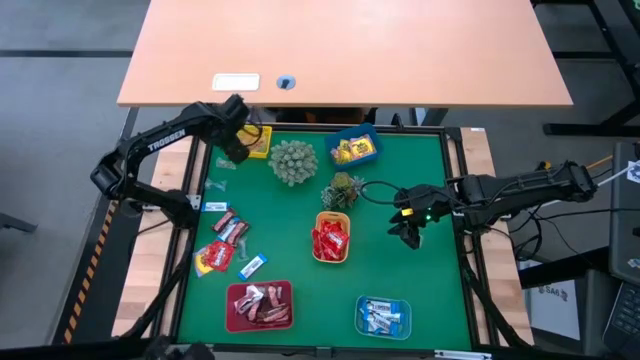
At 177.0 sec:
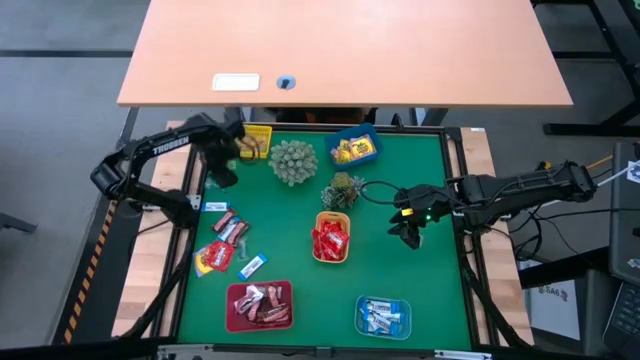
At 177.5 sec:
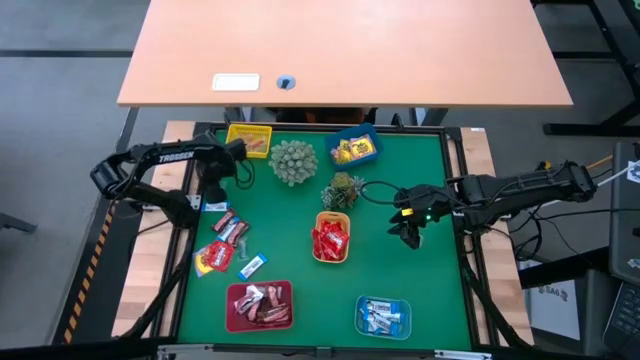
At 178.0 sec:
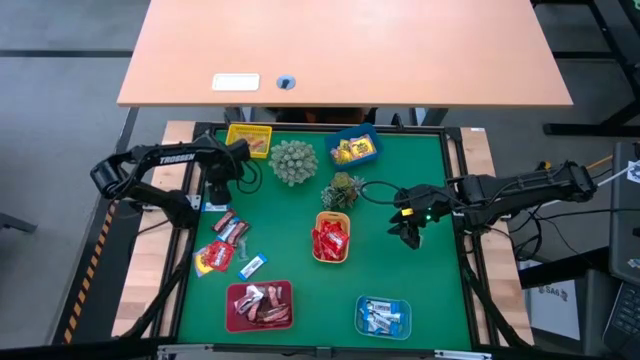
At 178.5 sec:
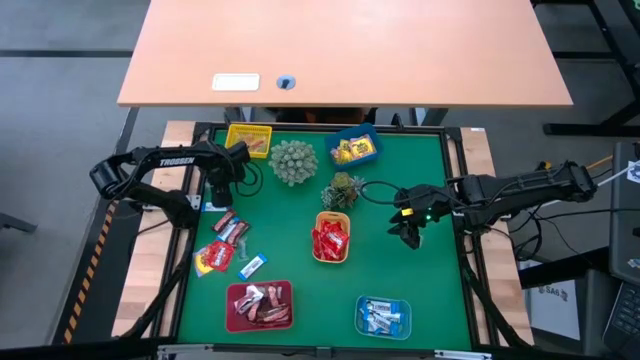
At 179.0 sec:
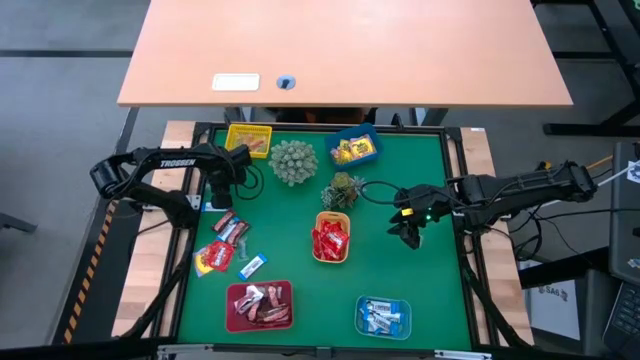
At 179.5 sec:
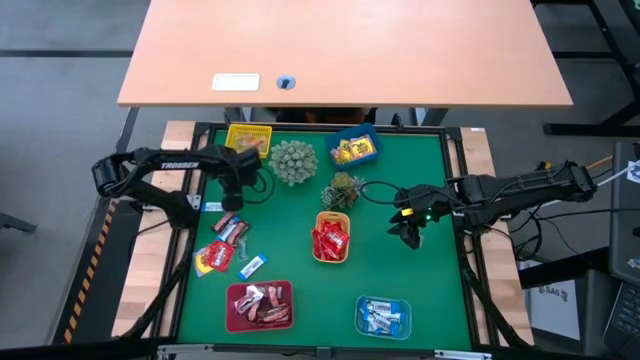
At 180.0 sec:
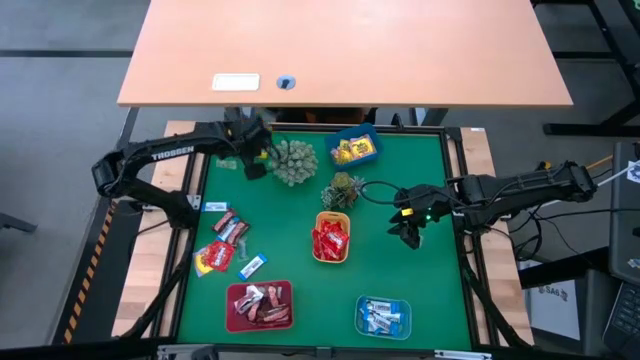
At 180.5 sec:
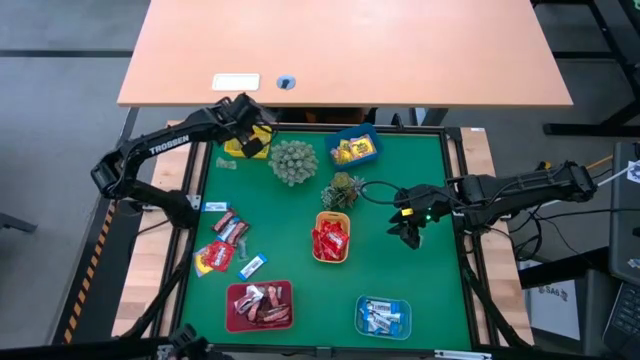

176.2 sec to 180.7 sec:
Task: Sort candy
Put the blue gummy into the yellow bin

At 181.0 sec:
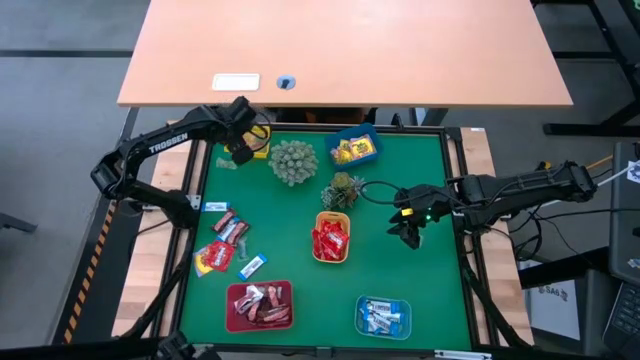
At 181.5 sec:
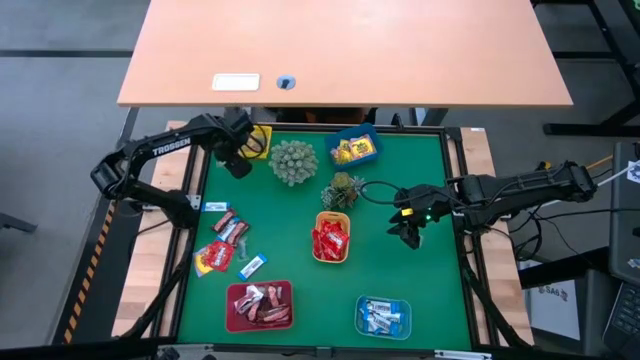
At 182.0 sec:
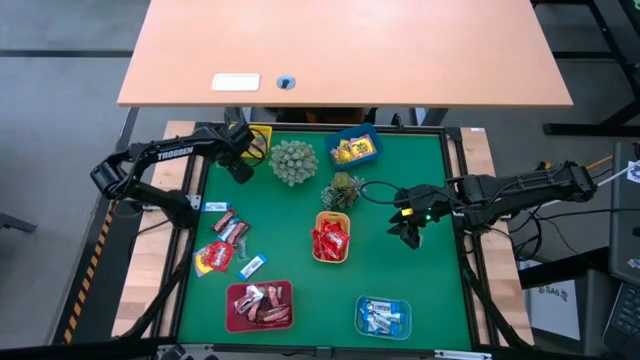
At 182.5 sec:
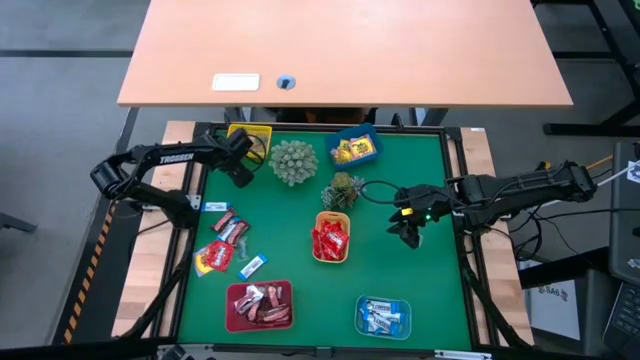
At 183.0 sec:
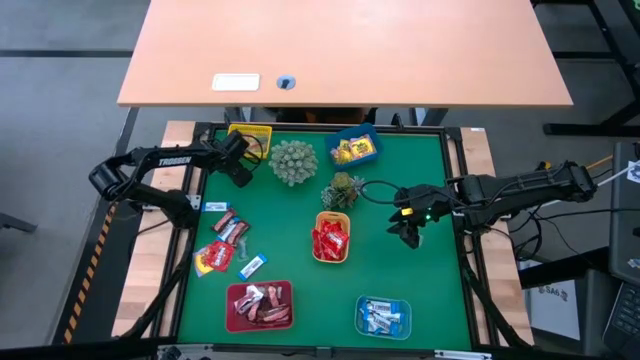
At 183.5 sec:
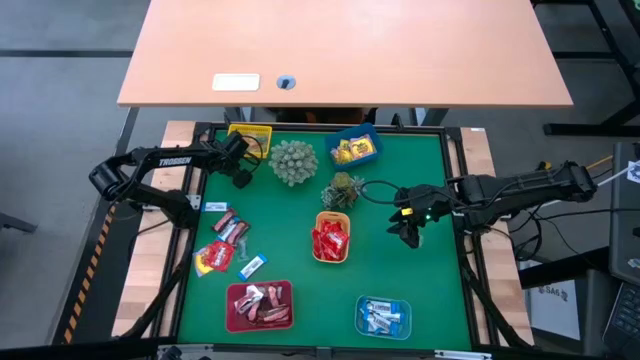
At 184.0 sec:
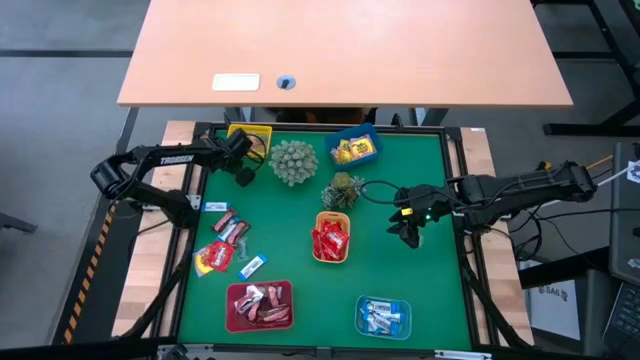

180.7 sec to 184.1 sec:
Put the green gummy into the yellow bin

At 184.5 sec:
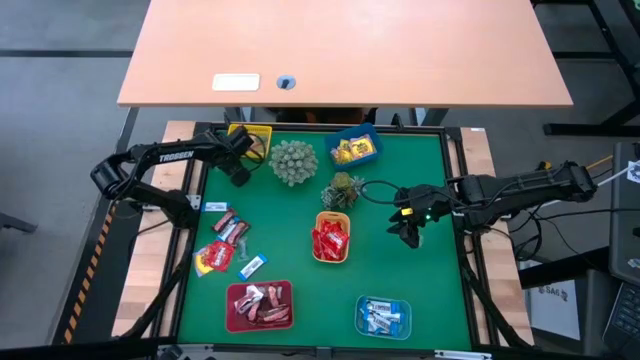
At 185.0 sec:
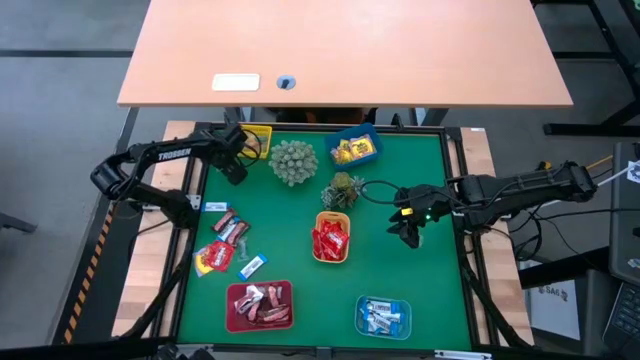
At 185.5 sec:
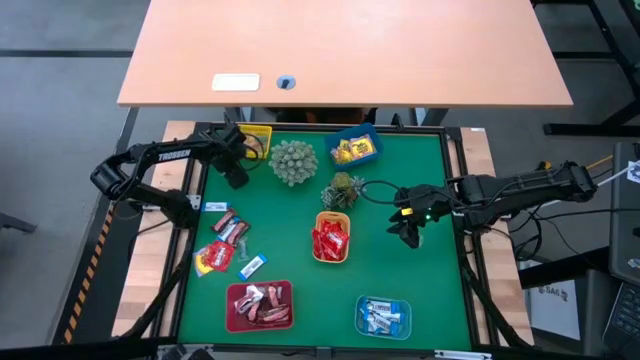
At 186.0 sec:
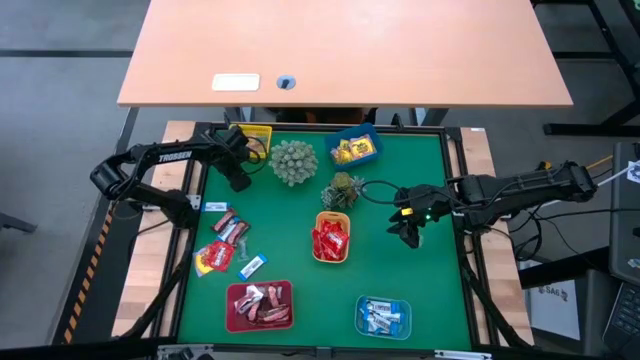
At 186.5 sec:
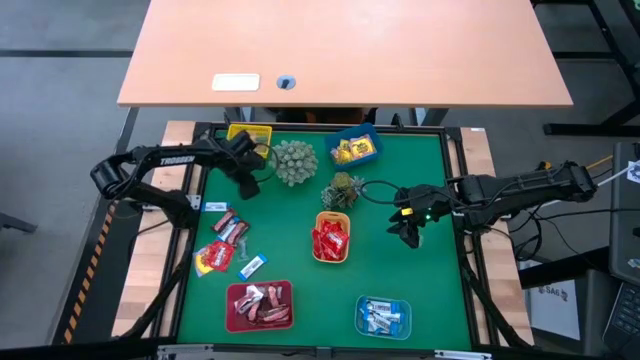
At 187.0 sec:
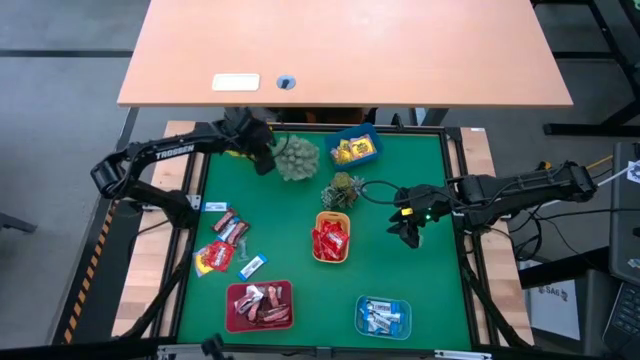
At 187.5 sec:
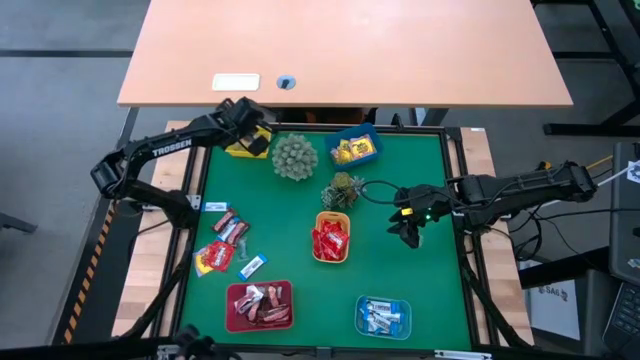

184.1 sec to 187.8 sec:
Put the green gummy into the yellow bin

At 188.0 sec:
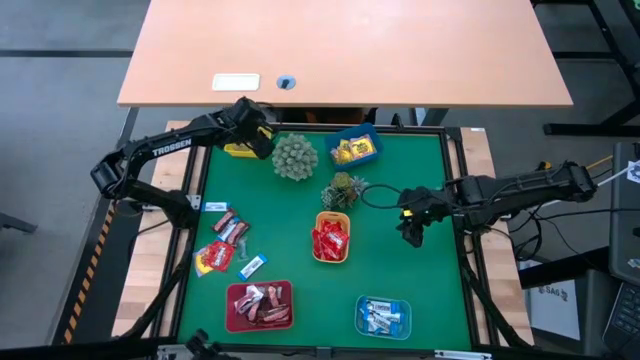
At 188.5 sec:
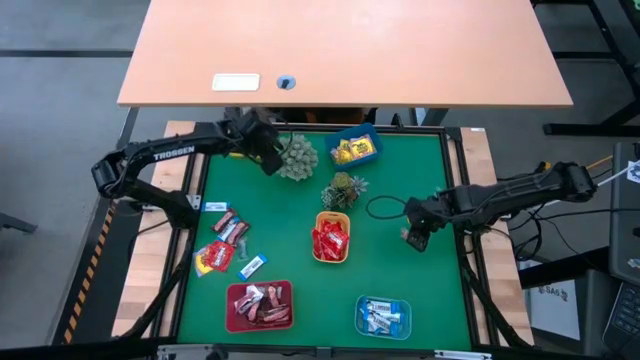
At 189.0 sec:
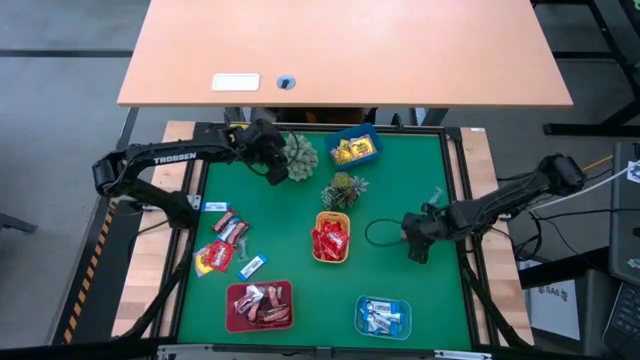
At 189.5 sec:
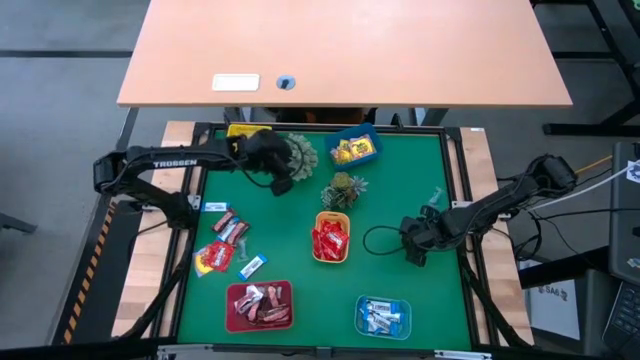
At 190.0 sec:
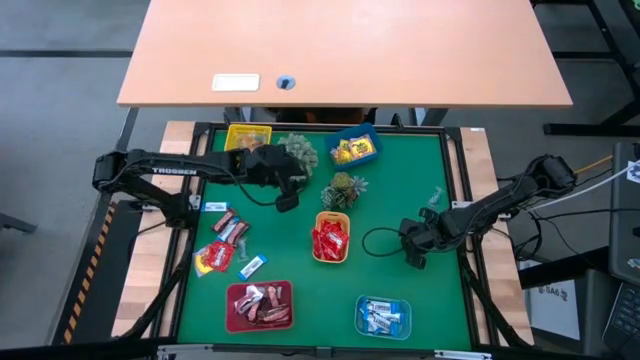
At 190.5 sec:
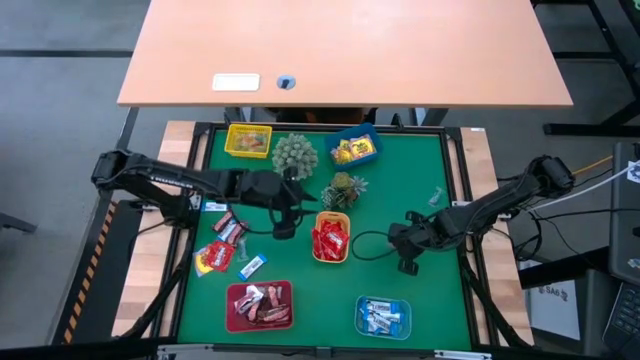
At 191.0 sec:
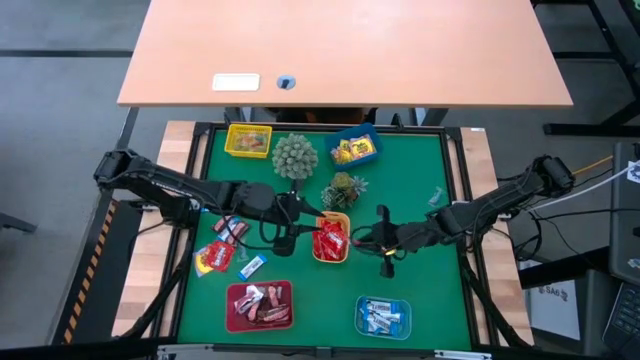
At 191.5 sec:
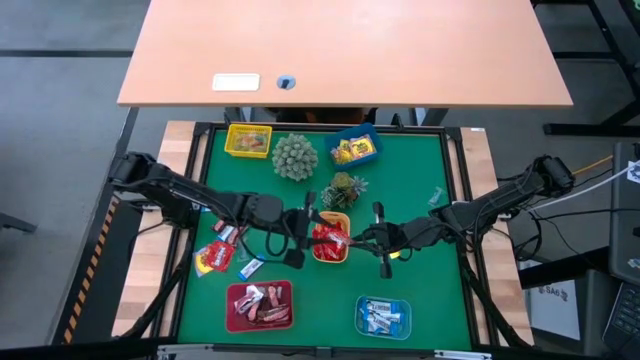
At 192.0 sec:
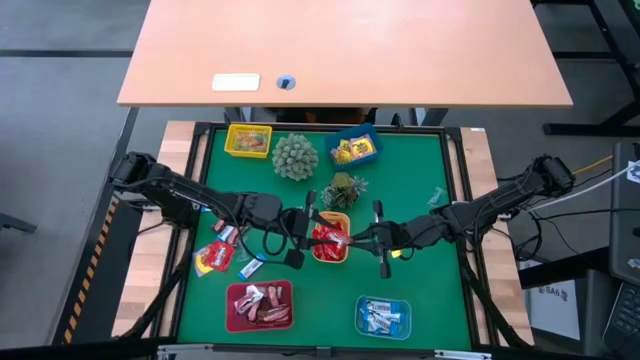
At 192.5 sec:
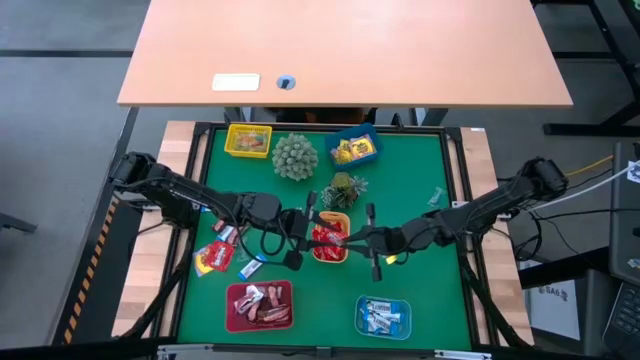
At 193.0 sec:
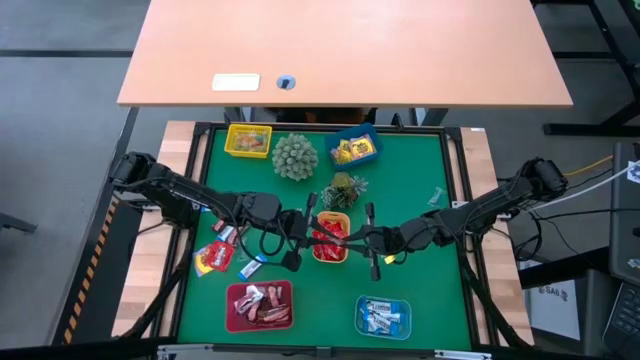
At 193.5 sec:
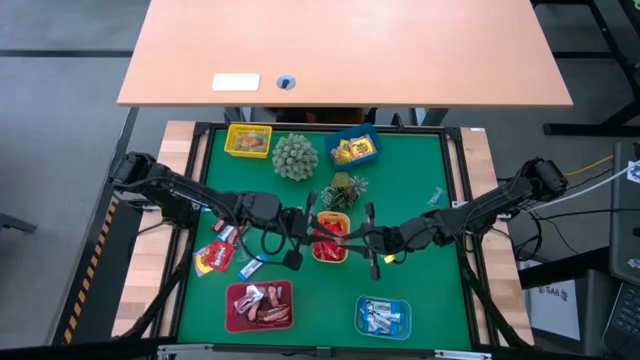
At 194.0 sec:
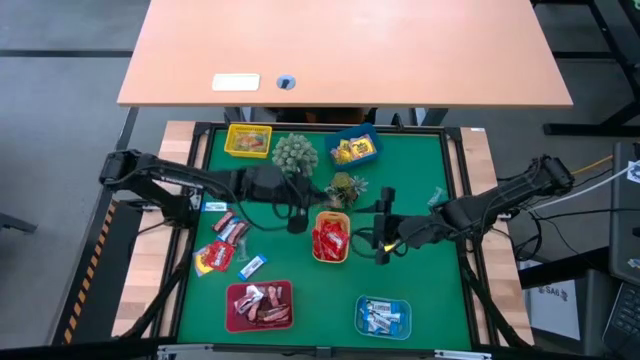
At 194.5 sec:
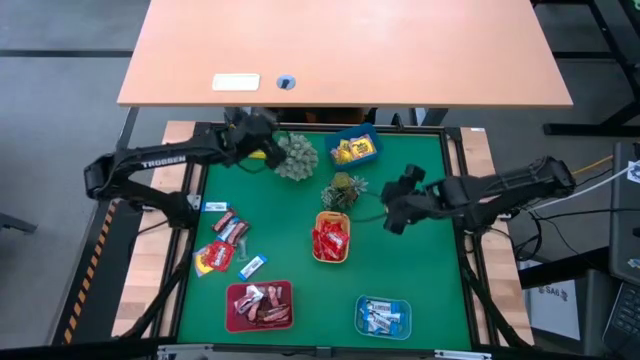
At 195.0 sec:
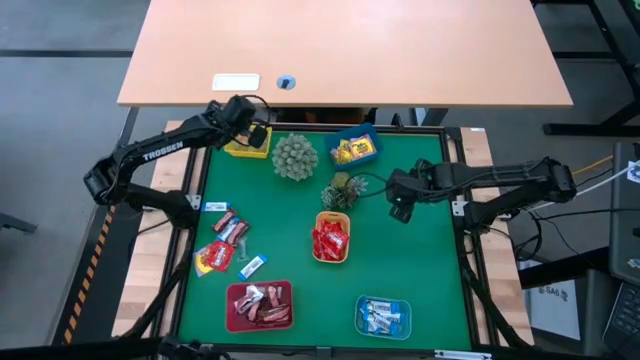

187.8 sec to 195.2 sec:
Put the orange gummy into the yellow bin

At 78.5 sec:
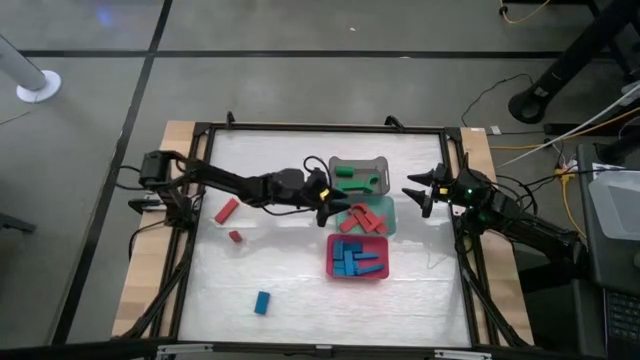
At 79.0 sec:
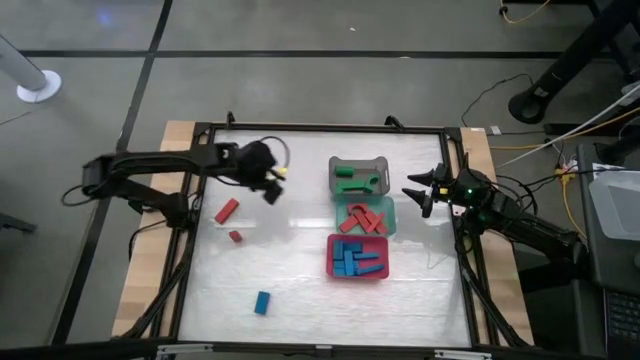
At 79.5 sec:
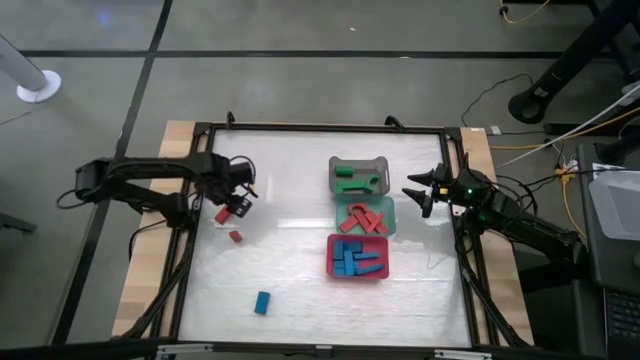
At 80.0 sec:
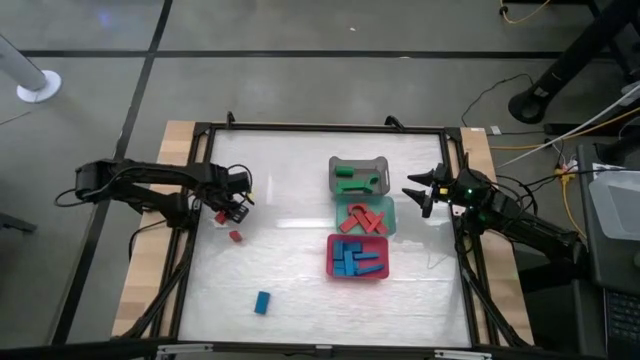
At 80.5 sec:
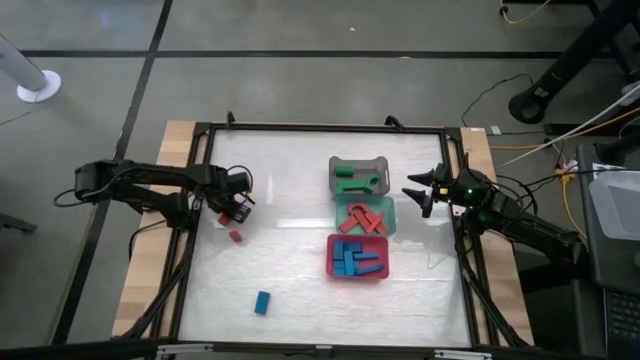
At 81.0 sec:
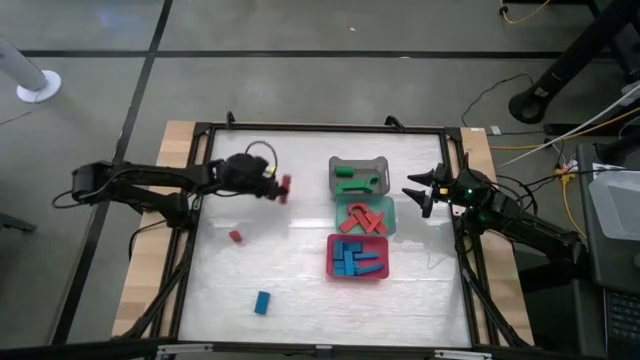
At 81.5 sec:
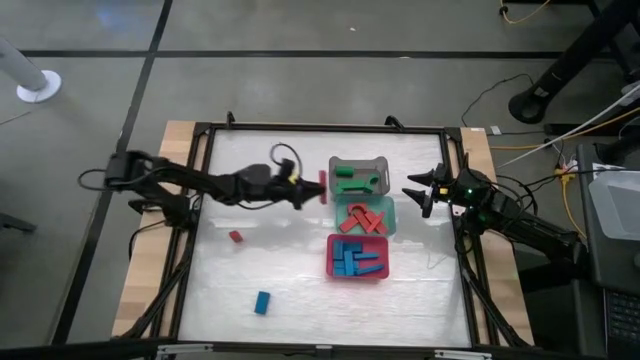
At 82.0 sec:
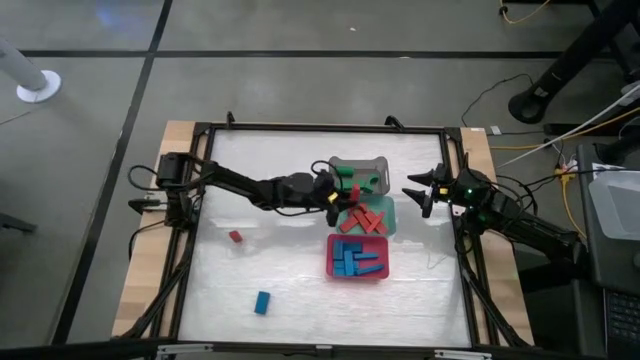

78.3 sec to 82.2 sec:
Task: Sort blocks
Put the red block into the green bin
